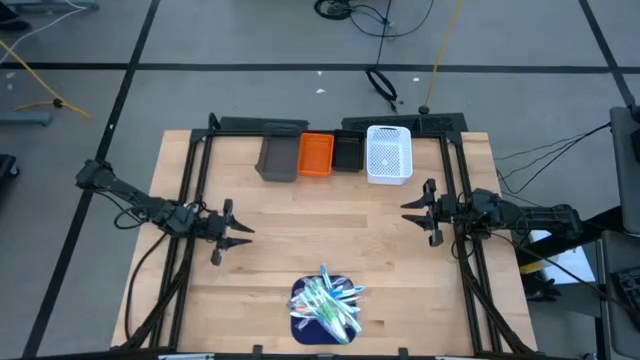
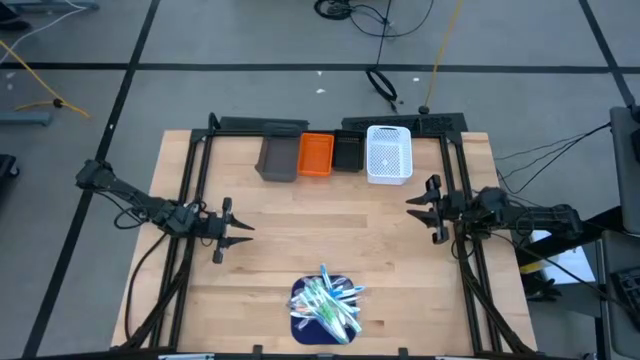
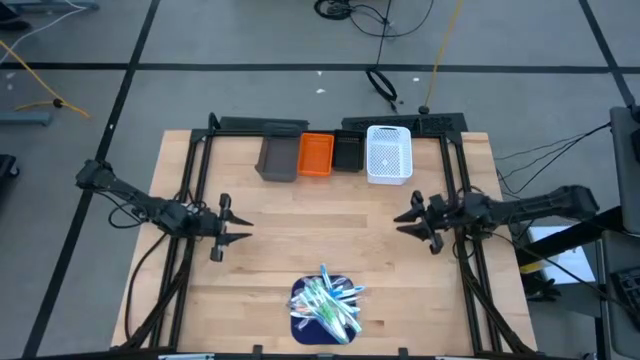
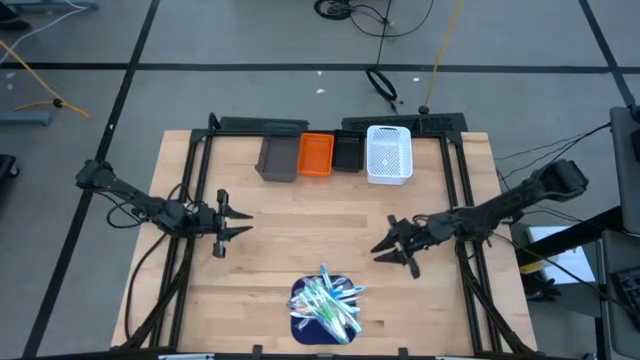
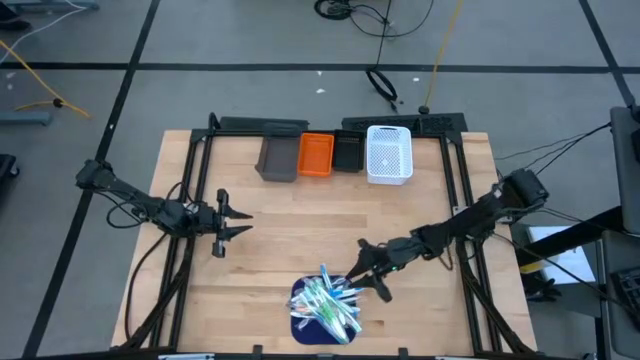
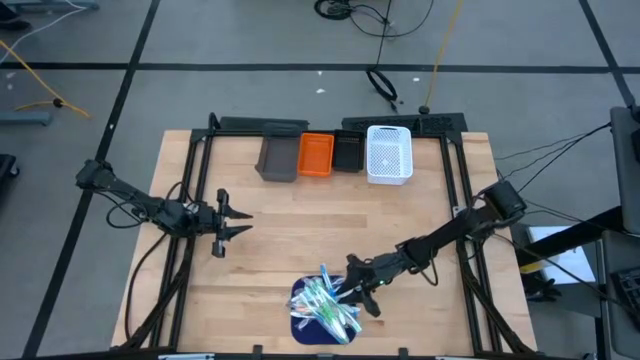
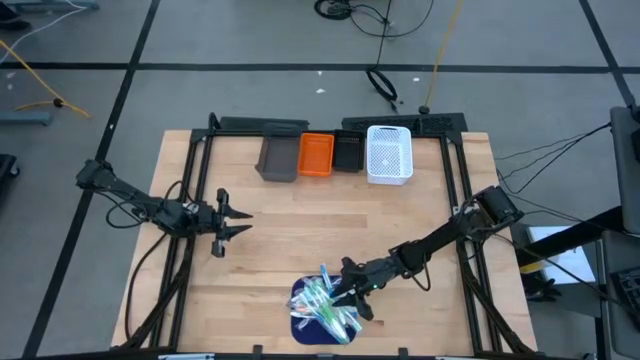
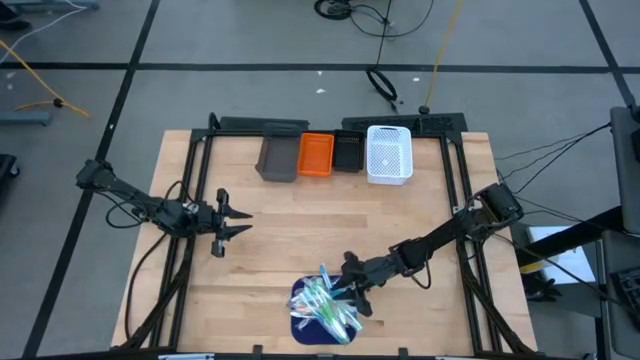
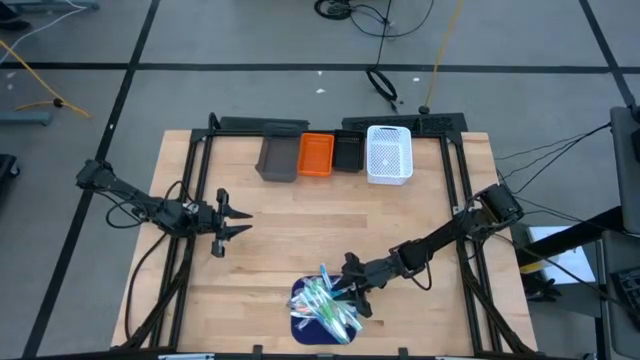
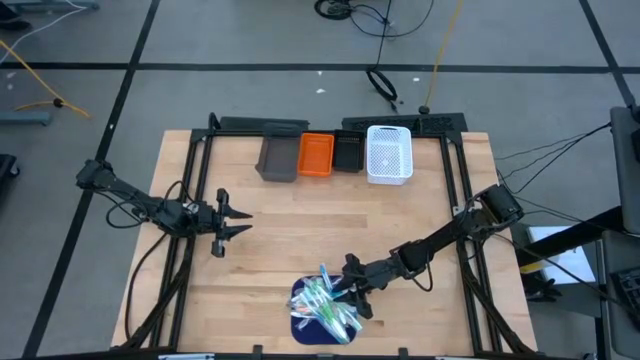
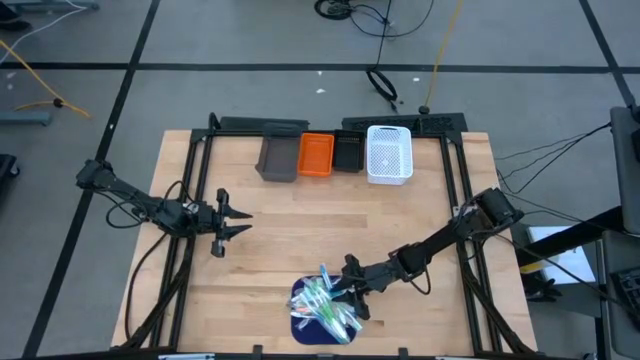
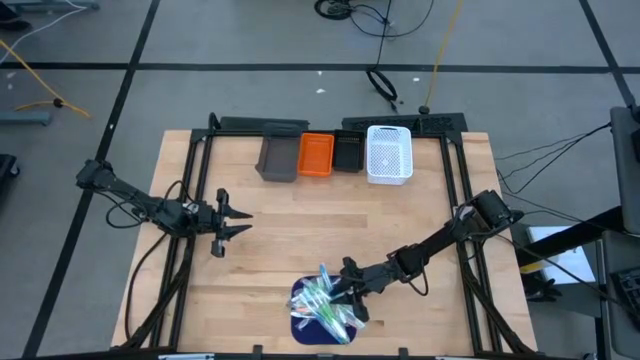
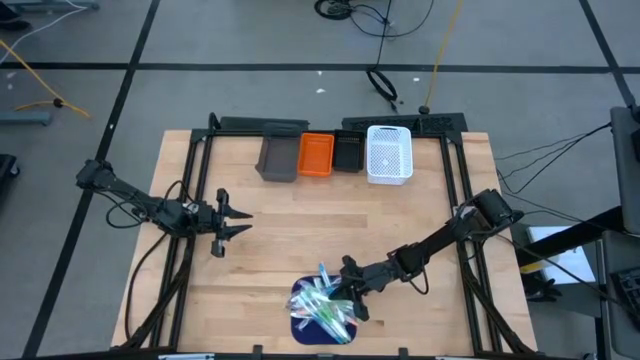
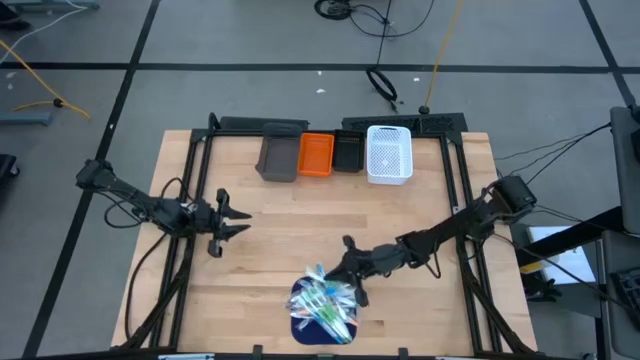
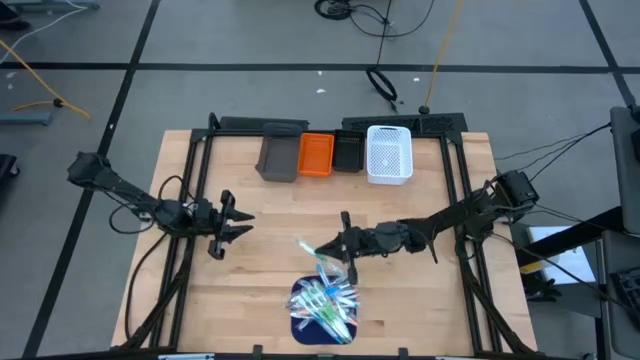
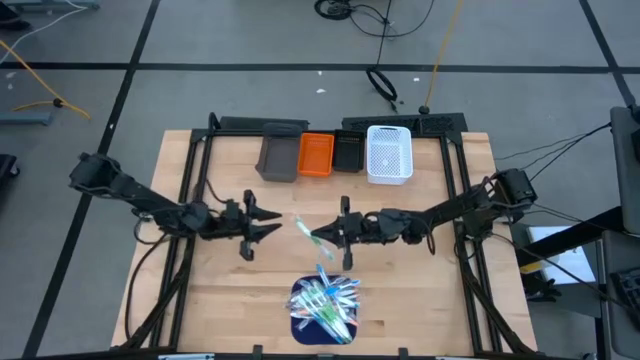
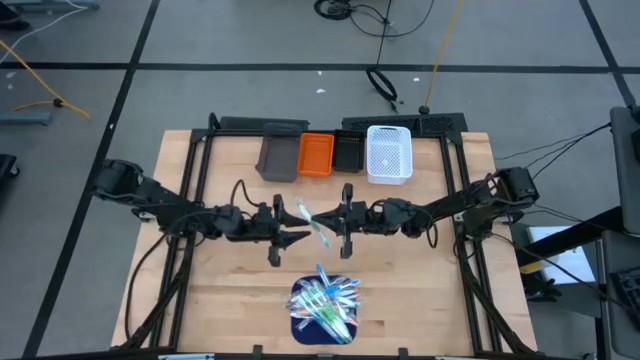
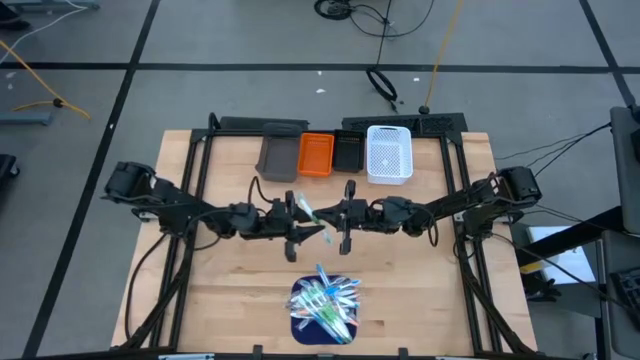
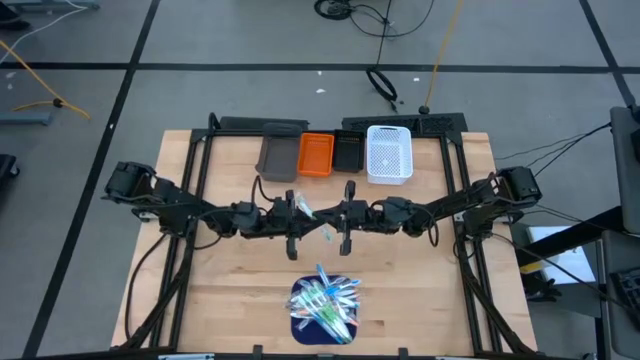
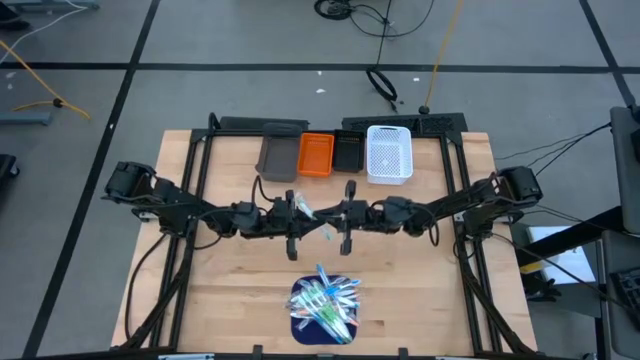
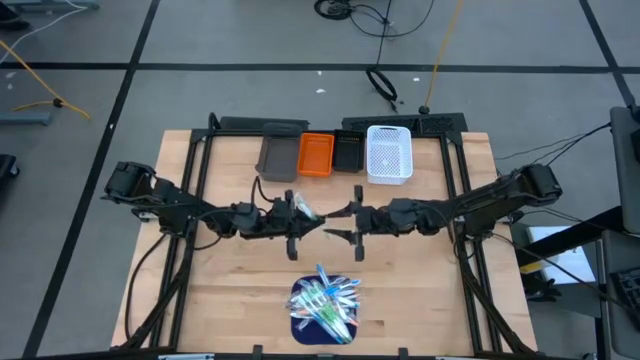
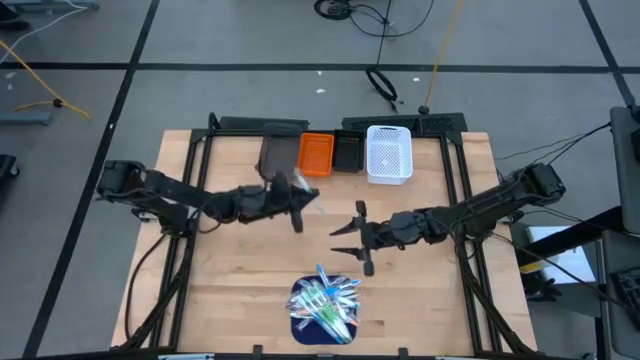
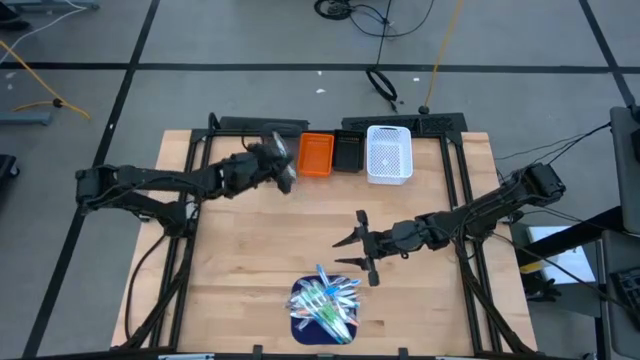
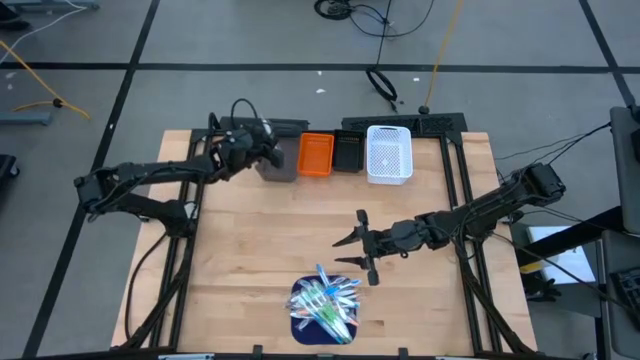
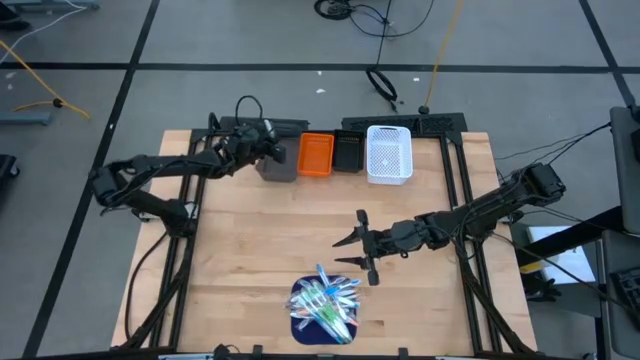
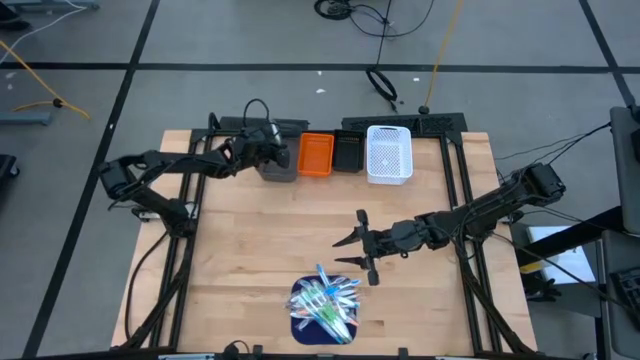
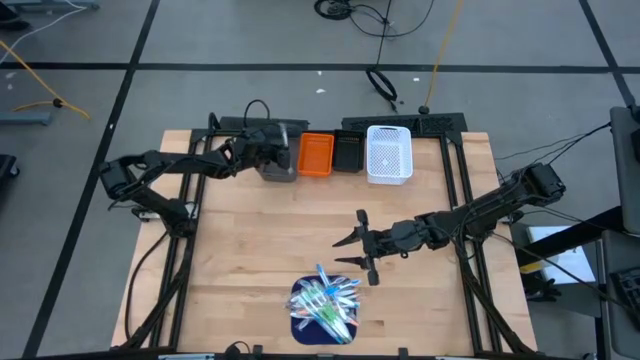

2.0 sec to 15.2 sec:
Task: Pick & Place Toothbrushes
Put the green toothbrush into the light black bin

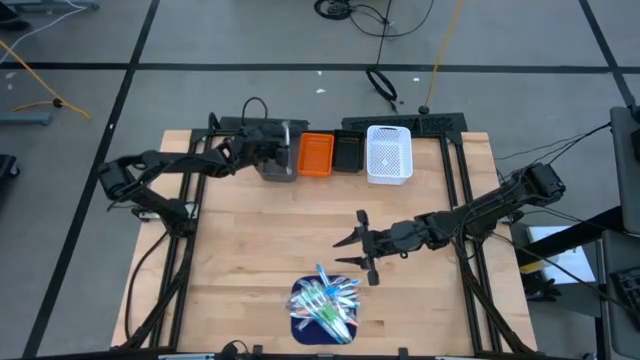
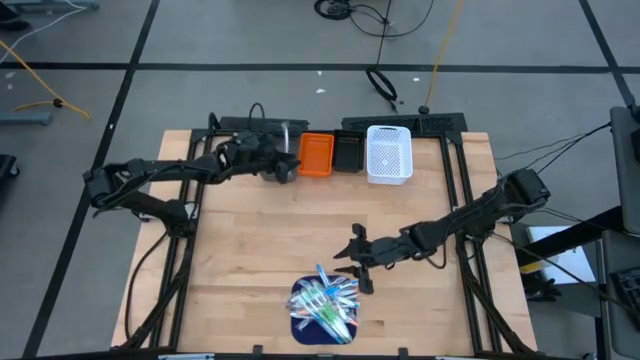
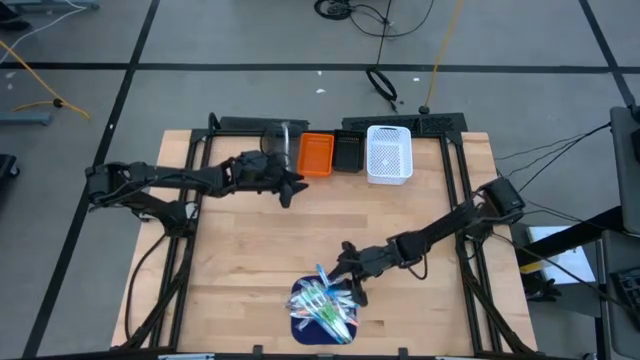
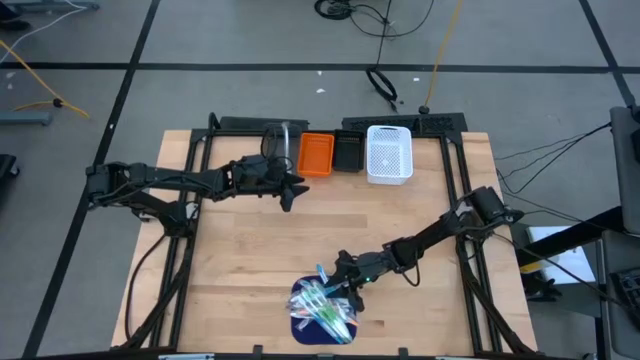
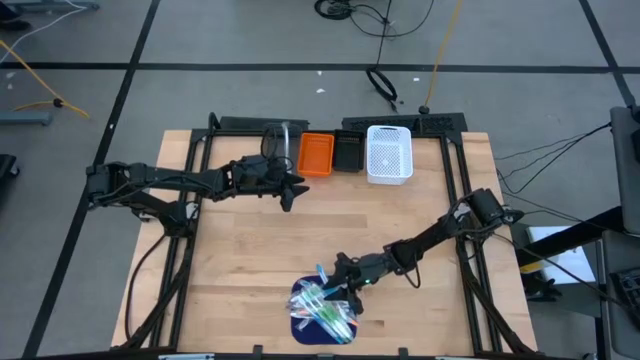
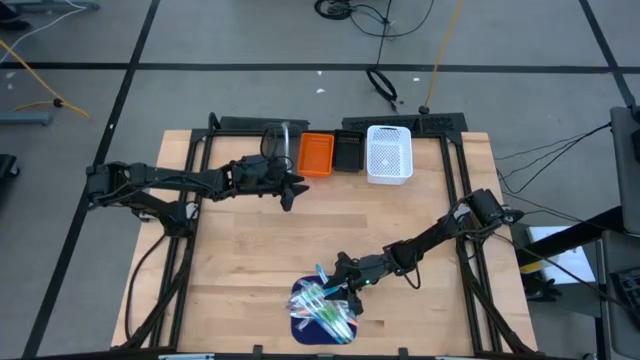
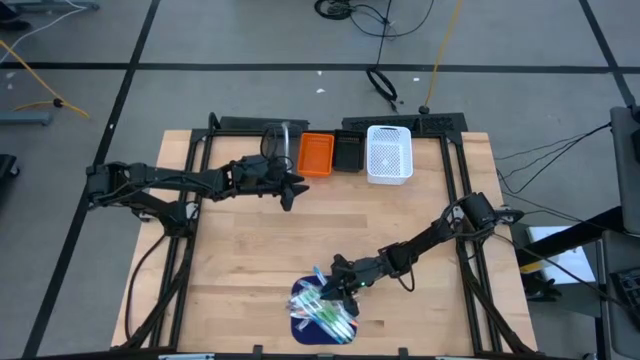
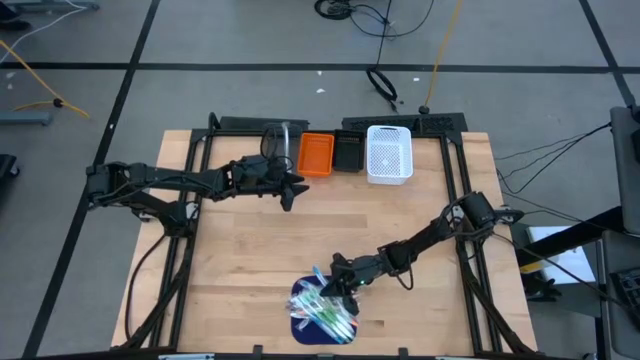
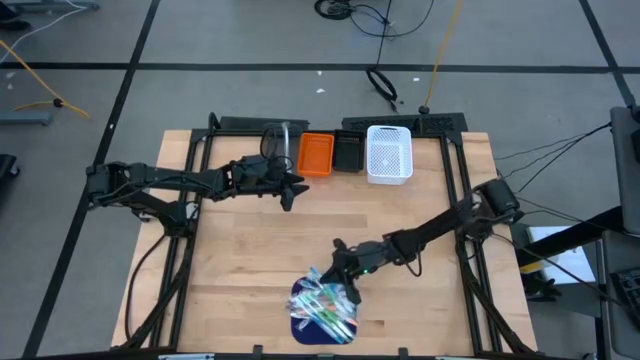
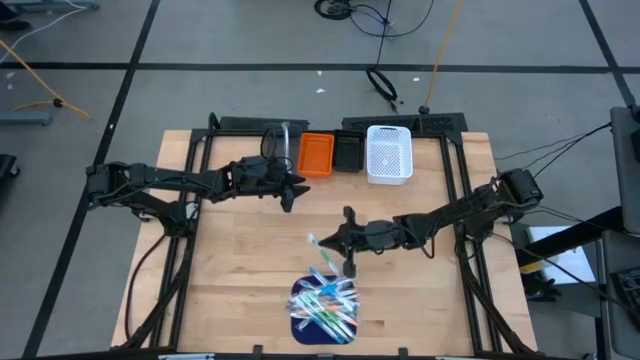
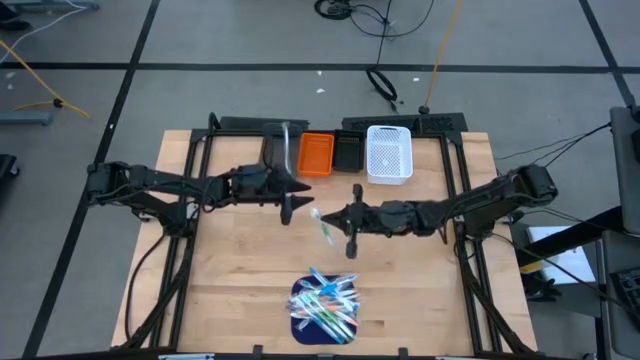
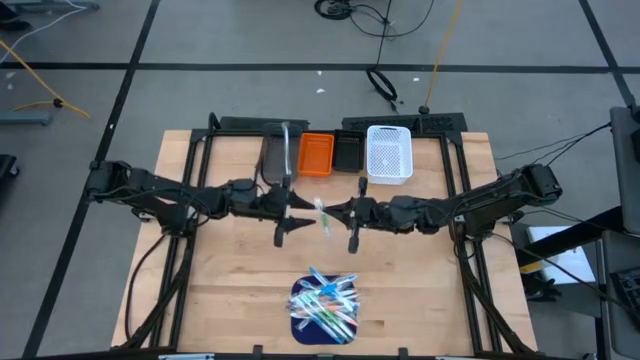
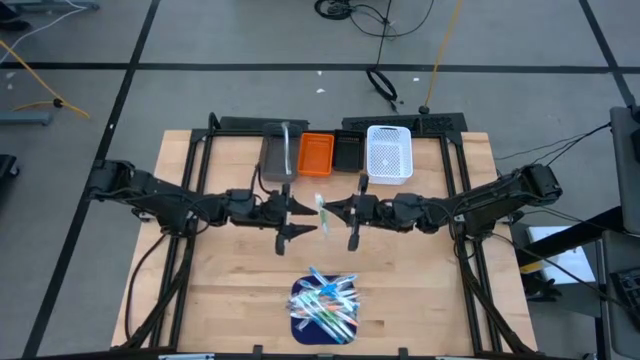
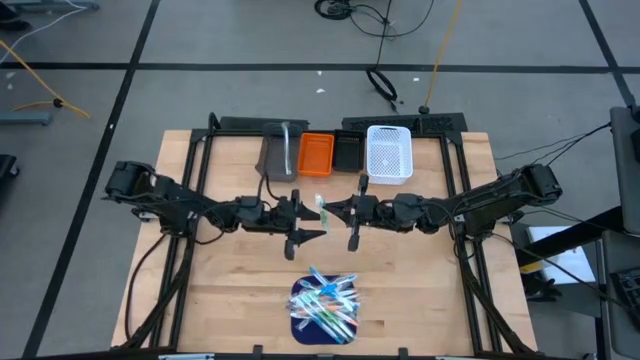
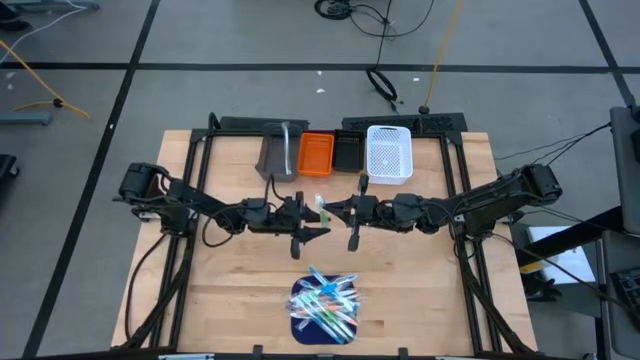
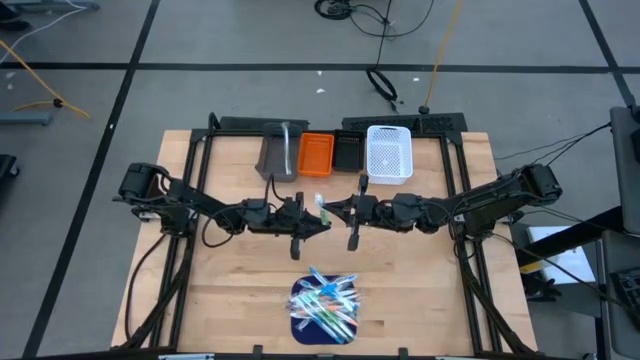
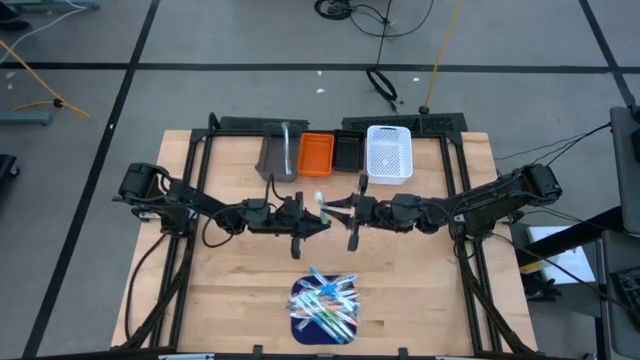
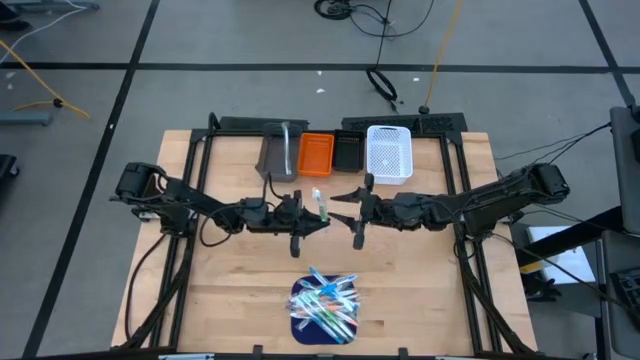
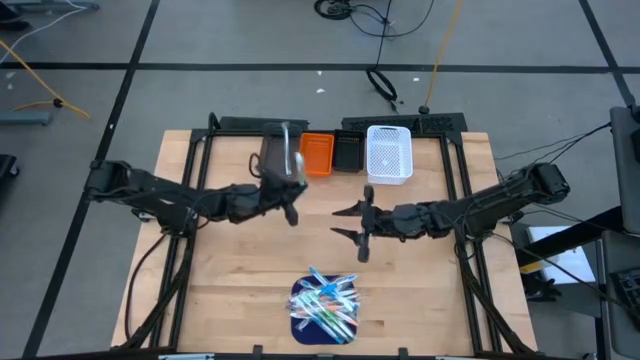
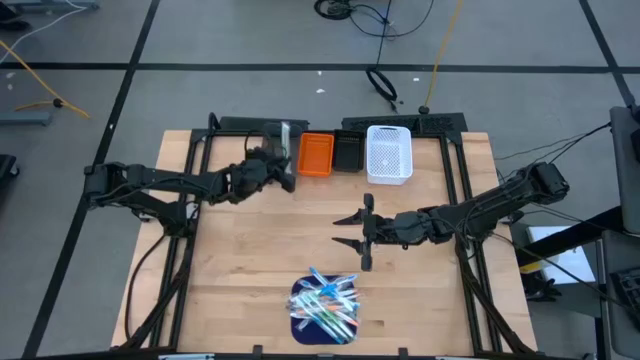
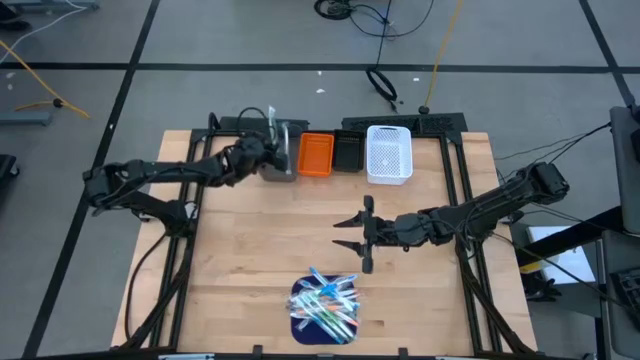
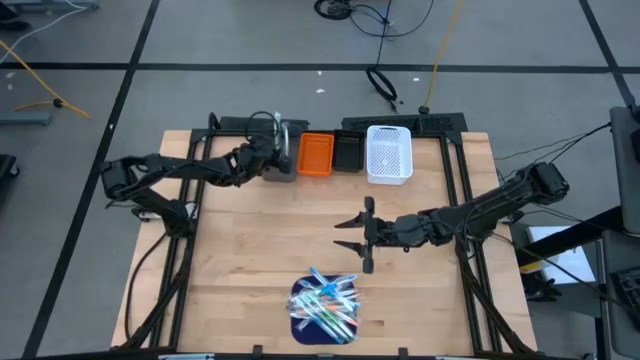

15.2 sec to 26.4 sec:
Put the green toothbrush into the light black bin
